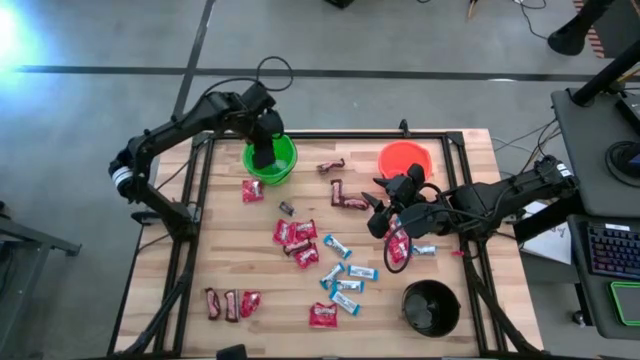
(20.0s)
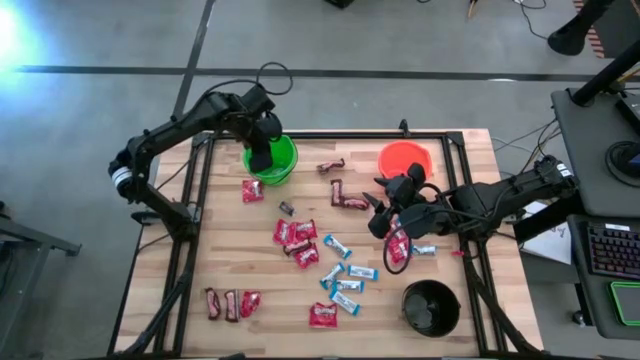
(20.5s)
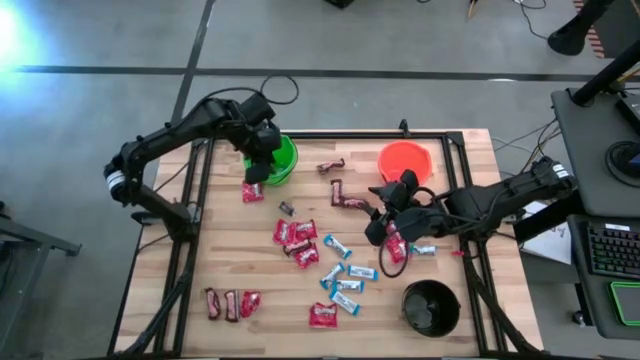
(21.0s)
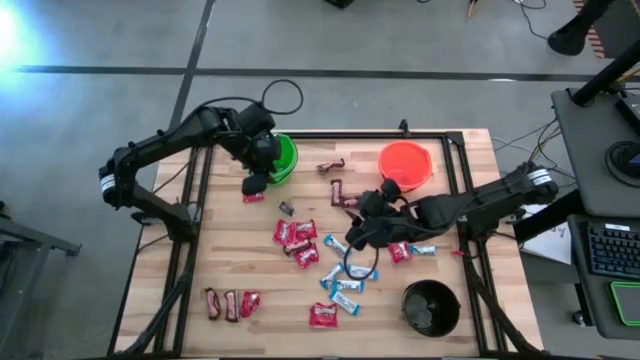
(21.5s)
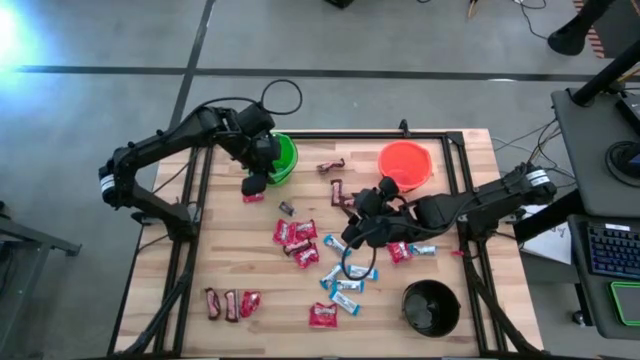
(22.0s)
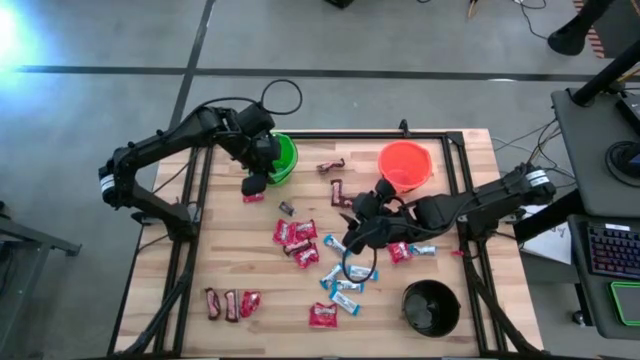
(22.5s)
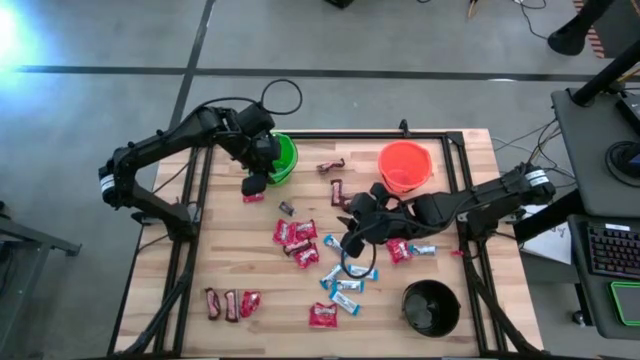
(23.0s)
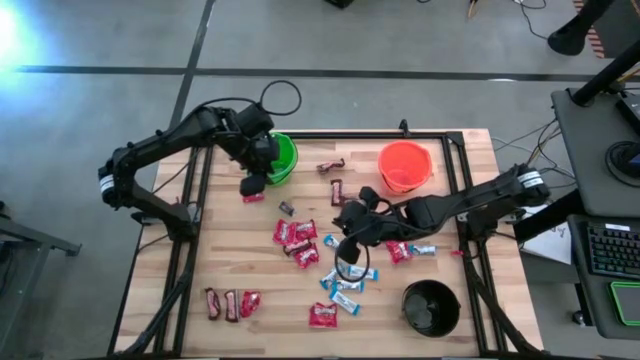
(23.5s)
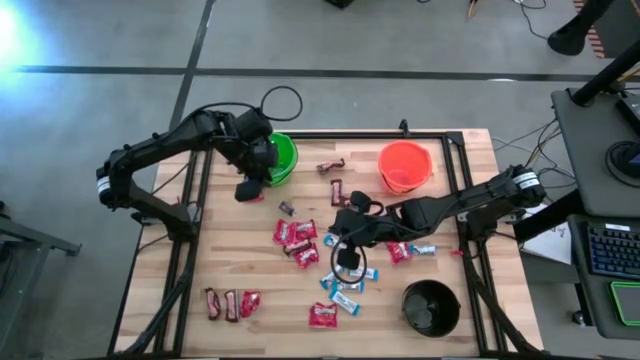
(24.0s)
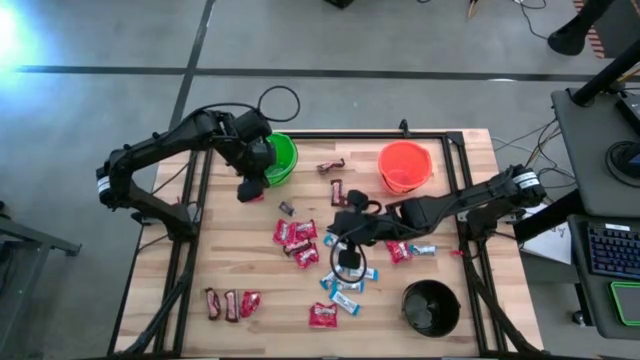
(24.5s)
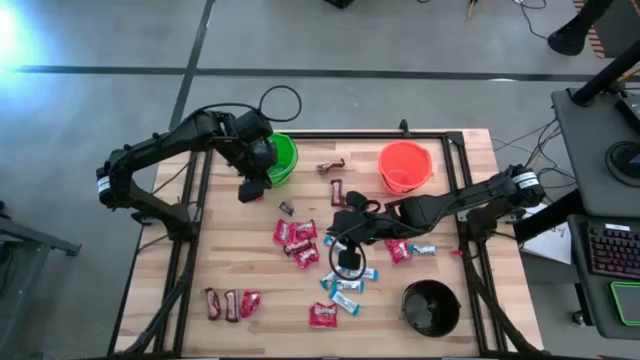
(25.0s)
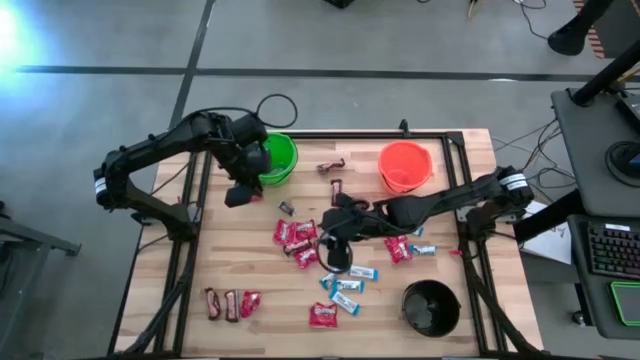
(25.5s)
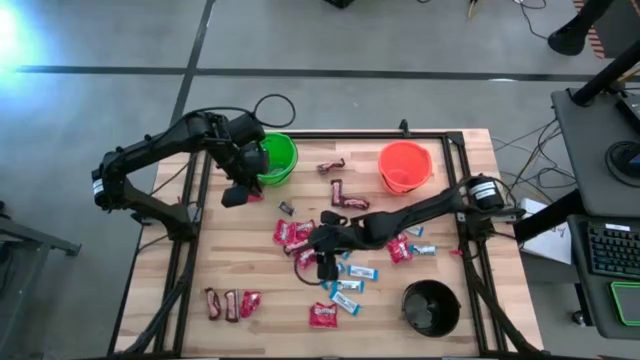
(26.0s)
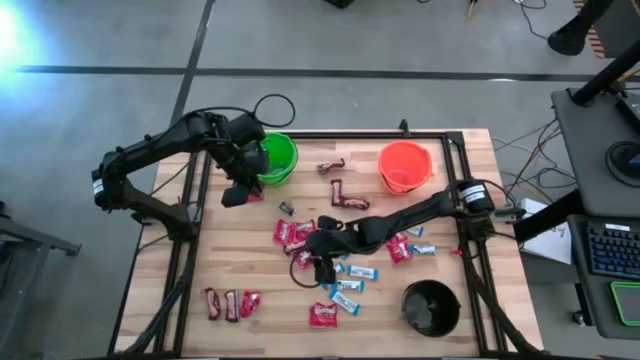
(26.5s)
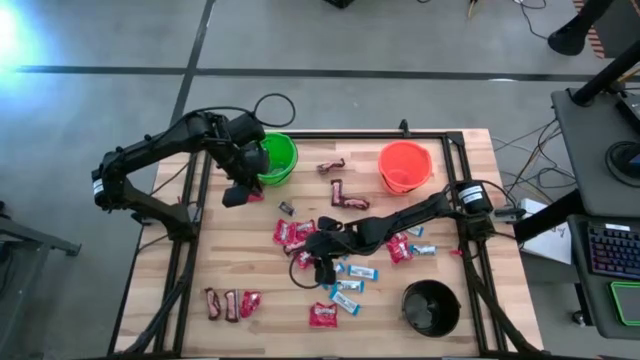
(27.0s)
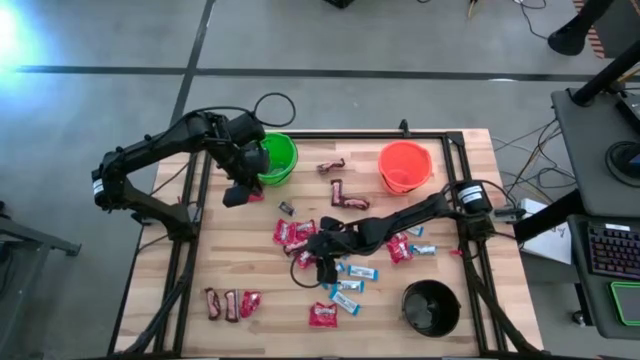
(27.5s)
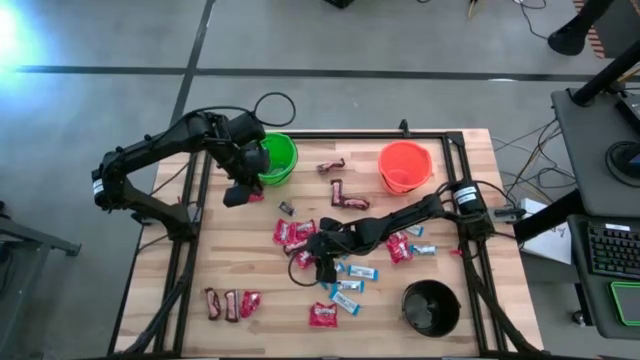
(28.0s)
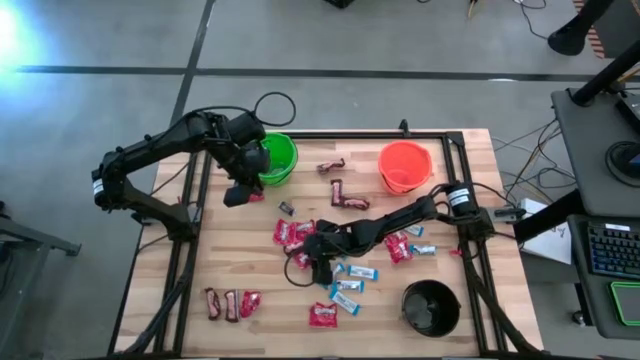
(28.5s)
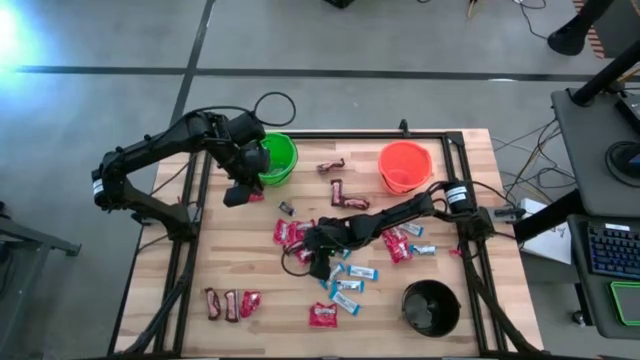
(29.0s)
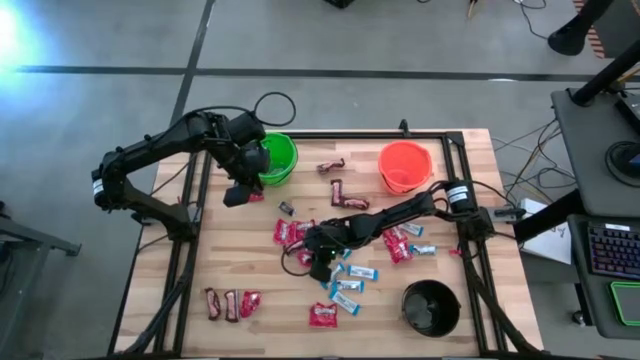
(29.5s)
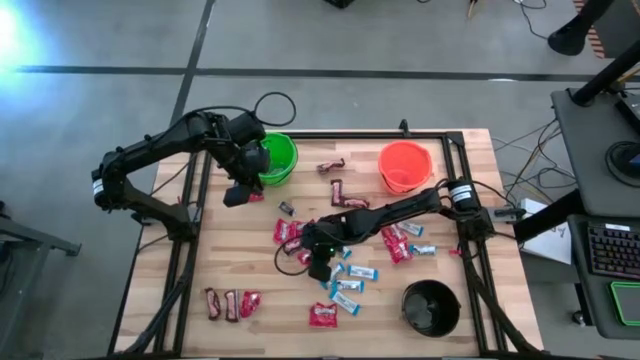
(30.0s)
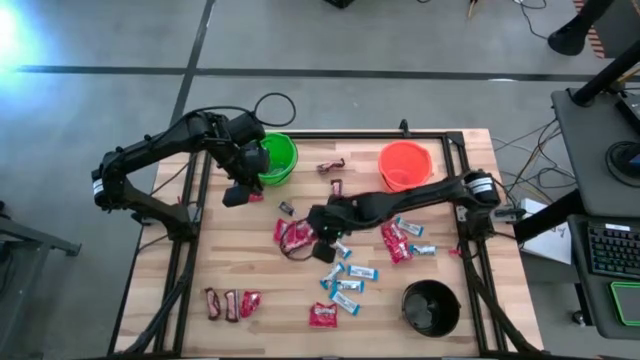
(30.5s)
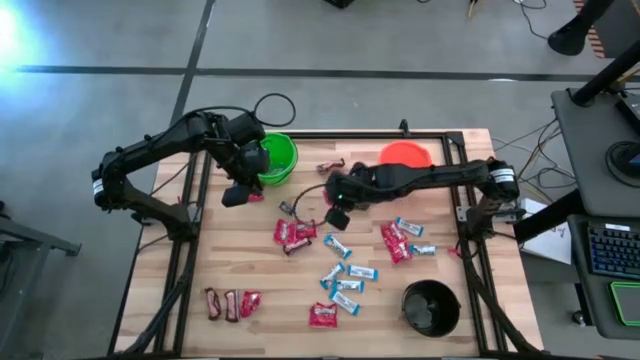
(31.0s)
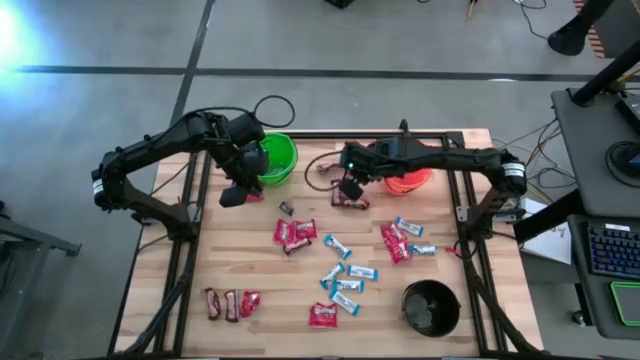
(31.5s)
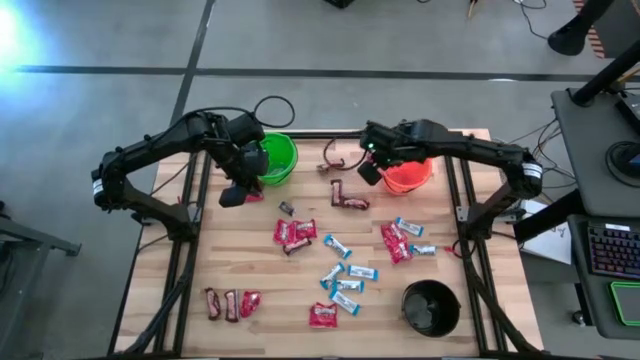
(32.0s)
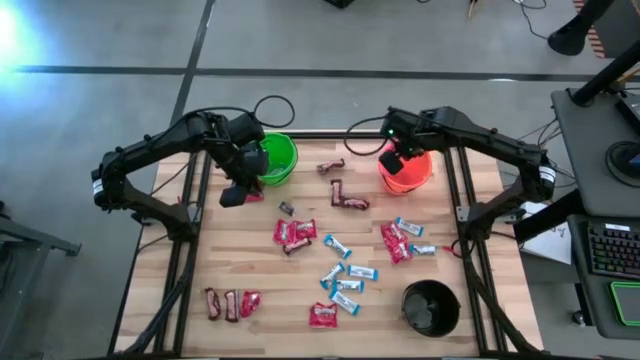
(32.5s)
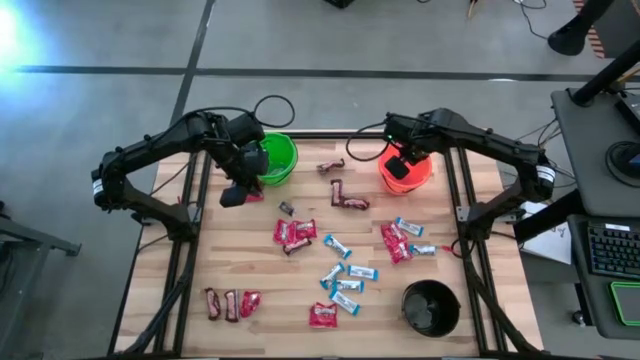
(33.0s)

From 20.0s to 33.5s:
Task: Sort candy
Put the red candy into the orange bucket

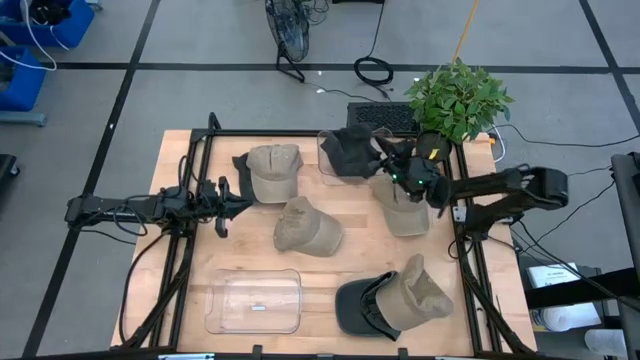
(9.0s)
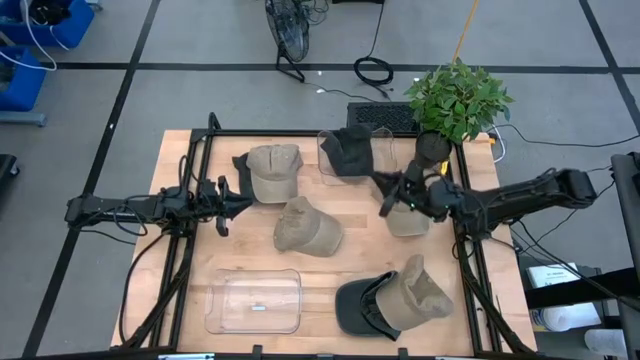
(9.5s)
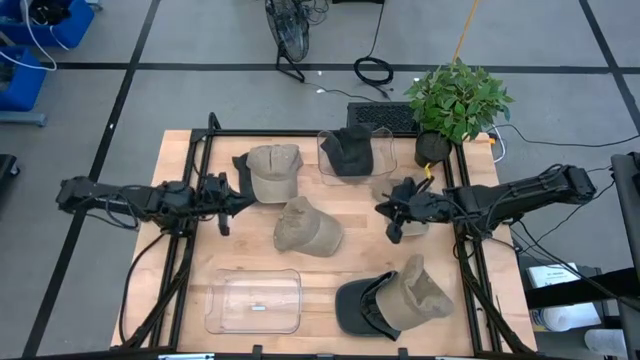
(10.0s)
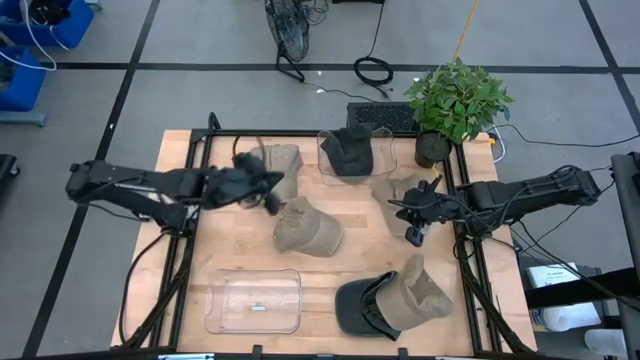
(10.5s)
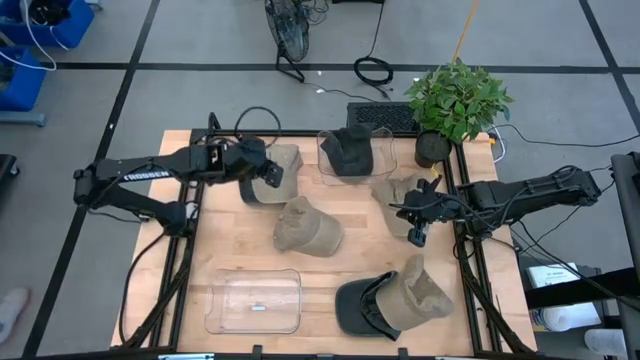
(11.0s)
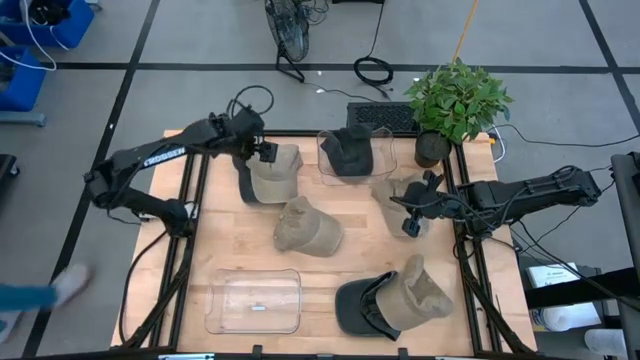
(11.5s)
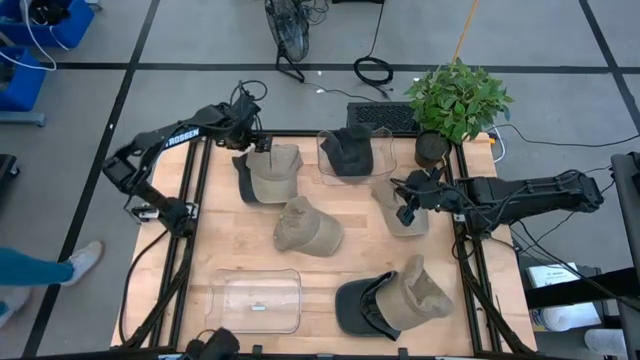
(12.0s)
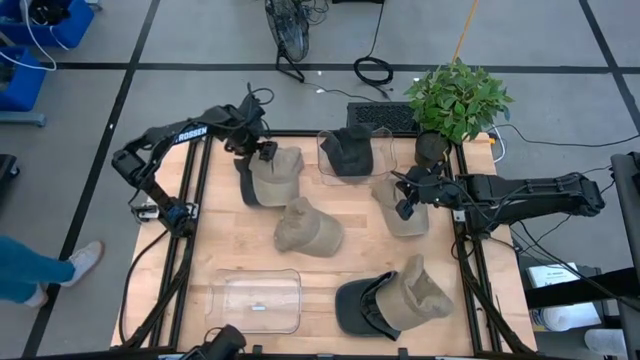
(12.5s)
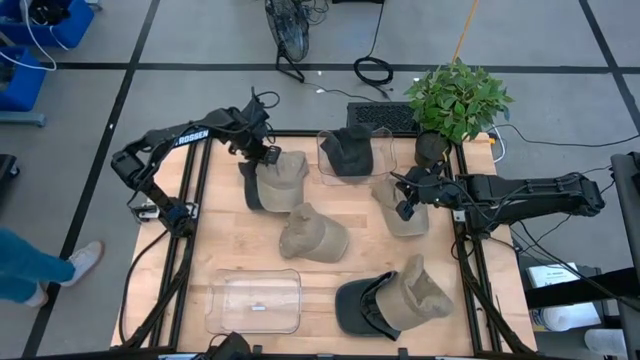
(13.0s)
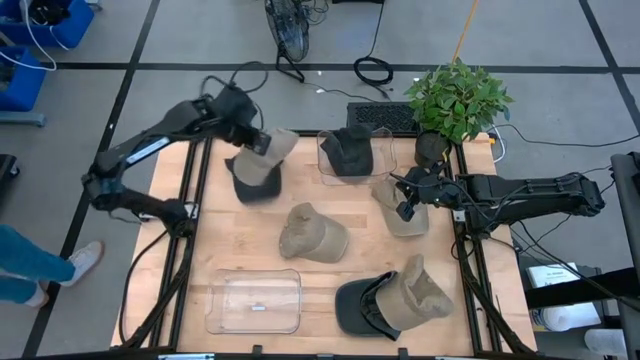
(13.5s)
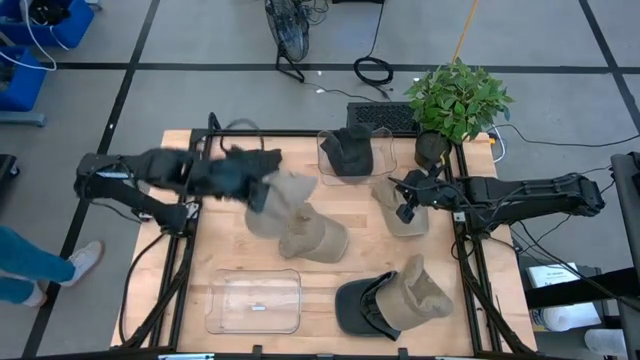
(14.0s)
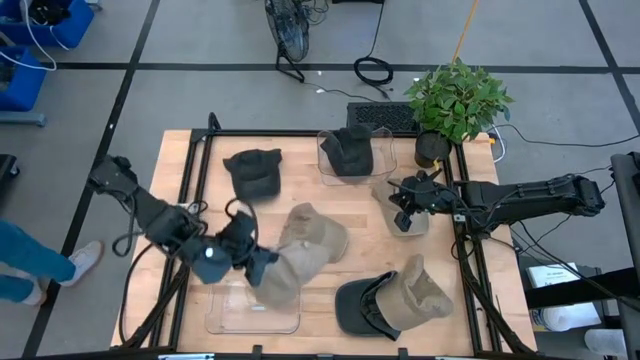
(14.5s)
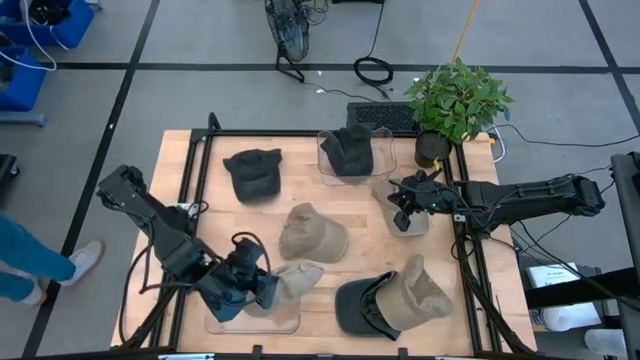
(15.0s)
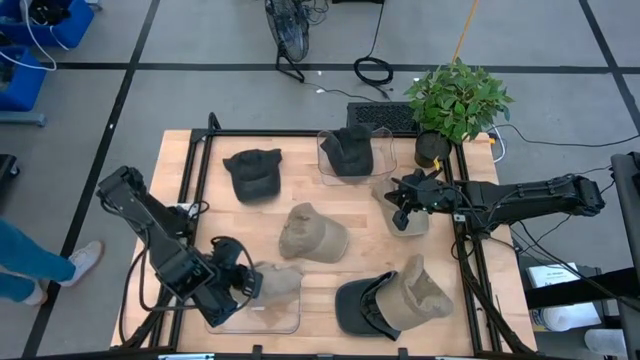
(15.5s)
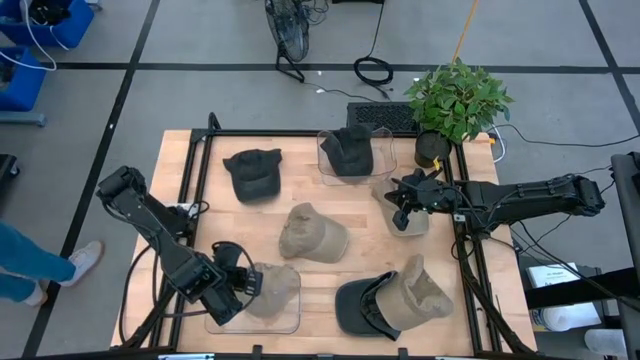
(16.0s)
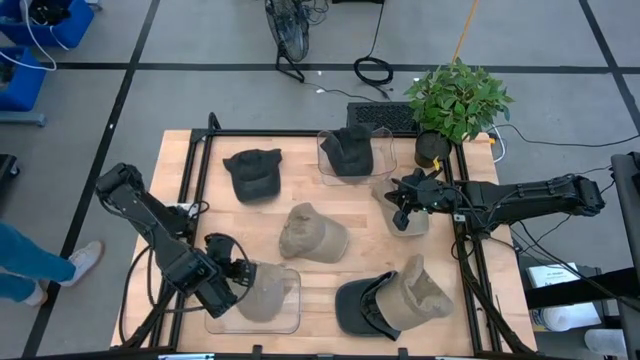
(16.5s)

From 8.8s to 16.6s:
Task: Pick & Place hat
Put the brown cap into the bottom transparent bin
